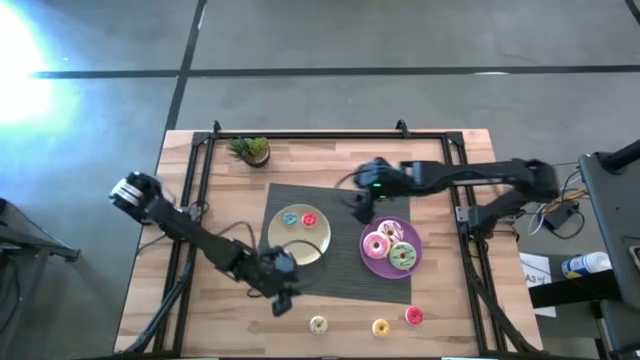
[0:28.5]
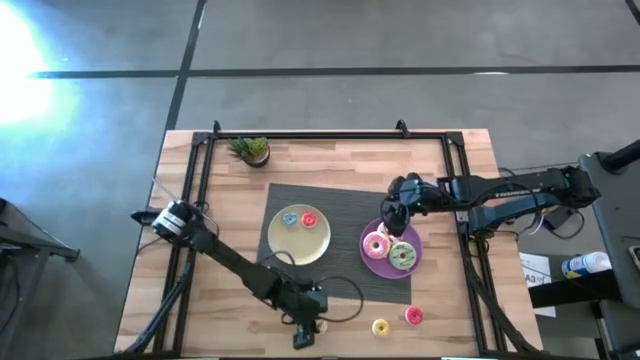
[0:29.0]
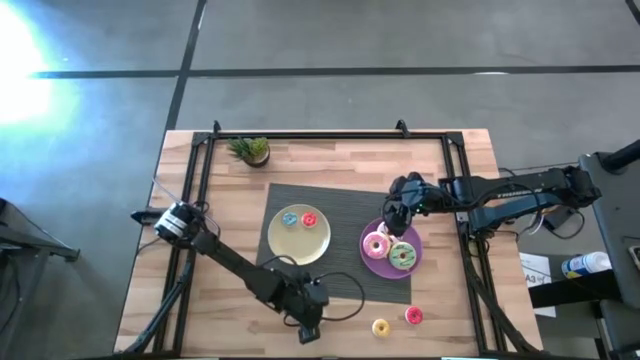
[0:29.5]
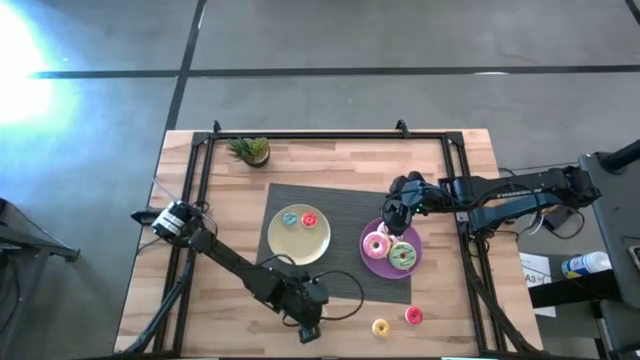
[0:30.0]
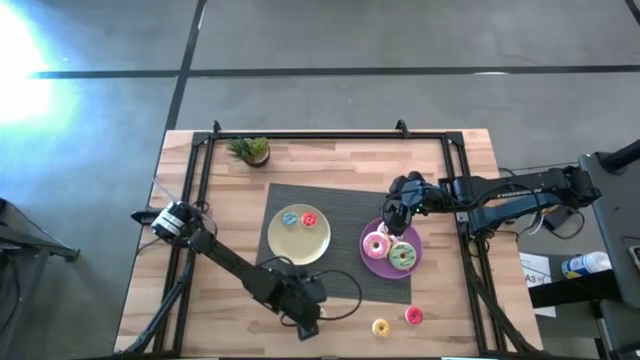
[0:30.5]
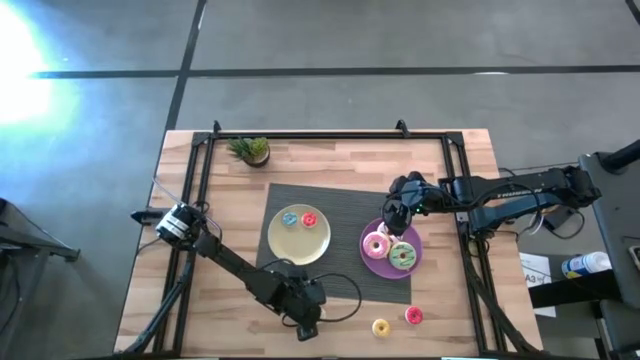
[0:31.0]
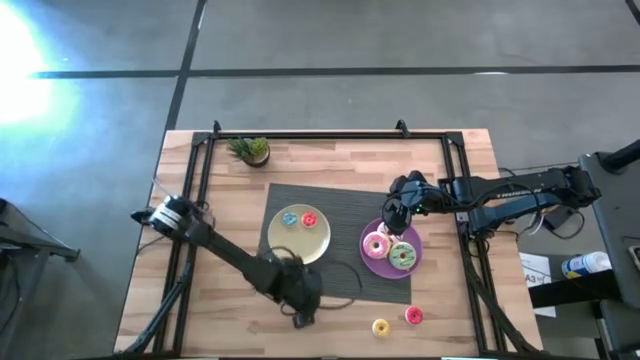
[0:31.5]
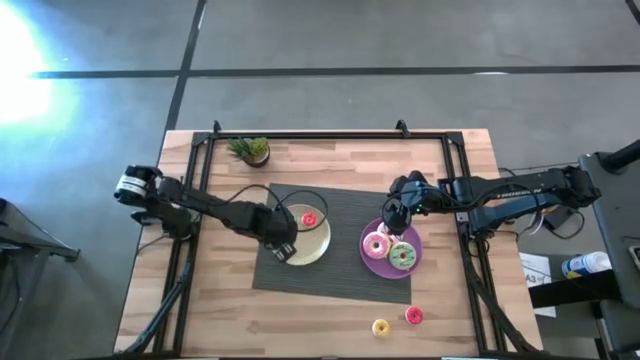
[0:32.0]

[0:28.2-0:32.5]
Task: Pick & Place donuts
Put the small white donut on the beige plate

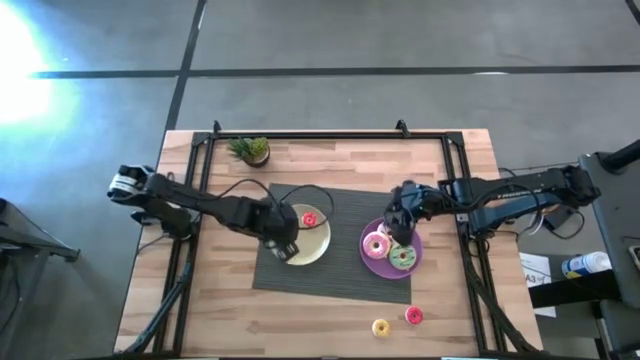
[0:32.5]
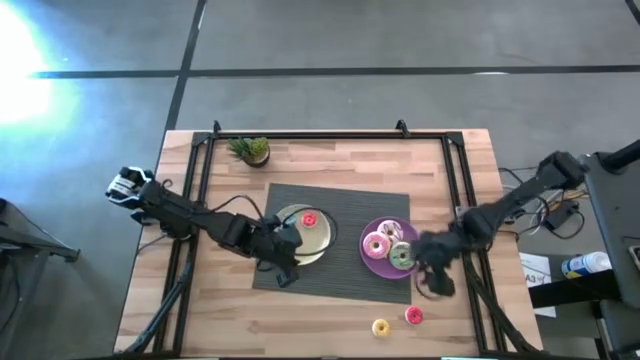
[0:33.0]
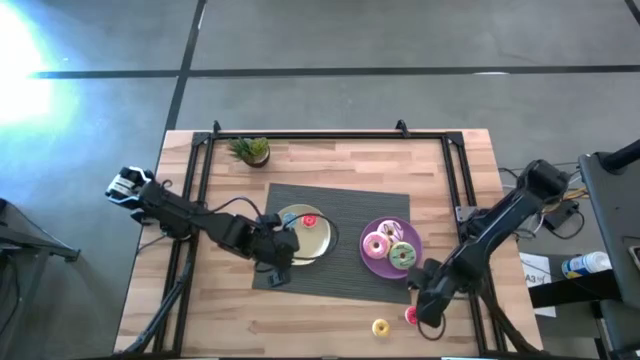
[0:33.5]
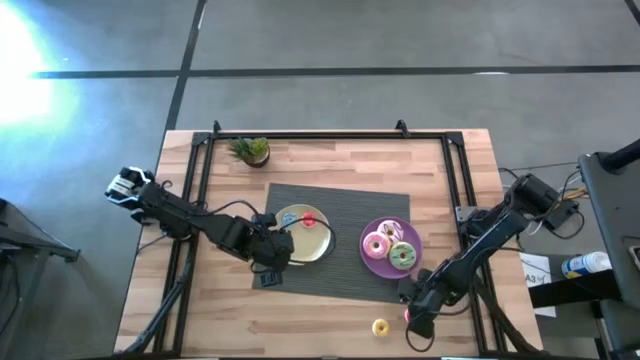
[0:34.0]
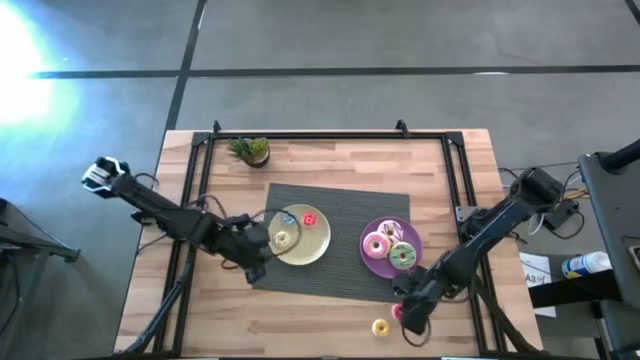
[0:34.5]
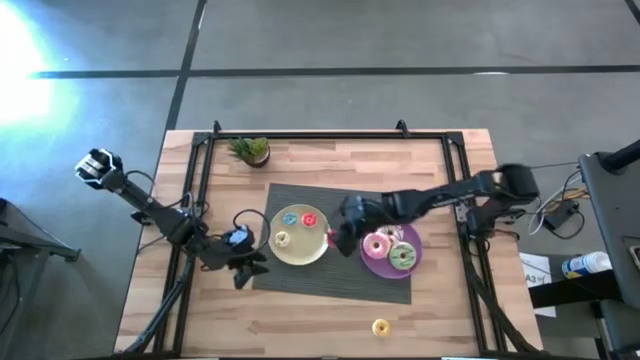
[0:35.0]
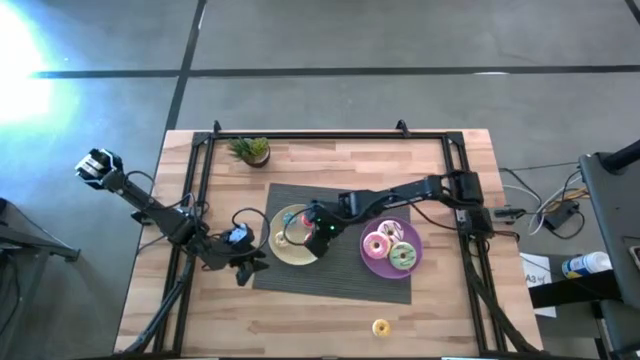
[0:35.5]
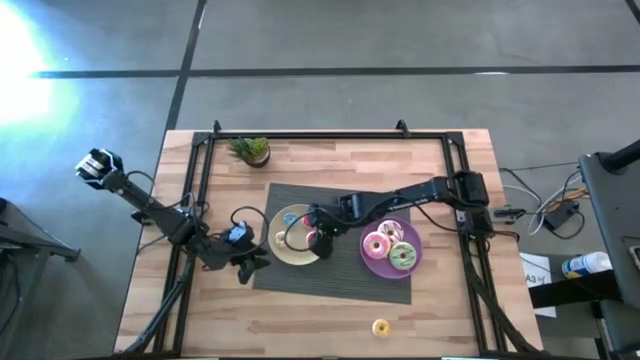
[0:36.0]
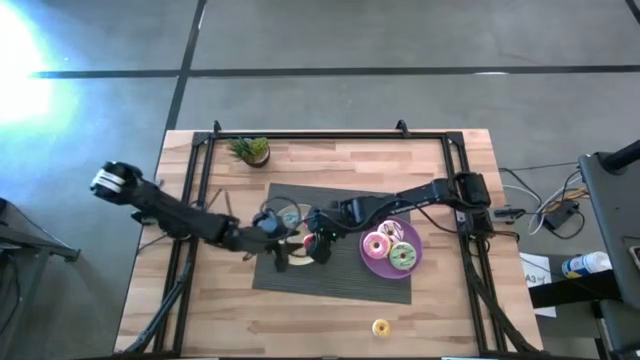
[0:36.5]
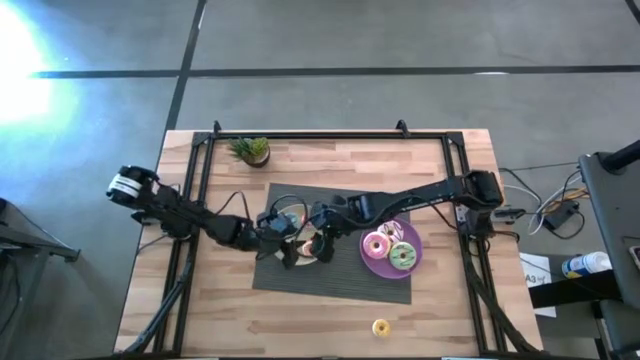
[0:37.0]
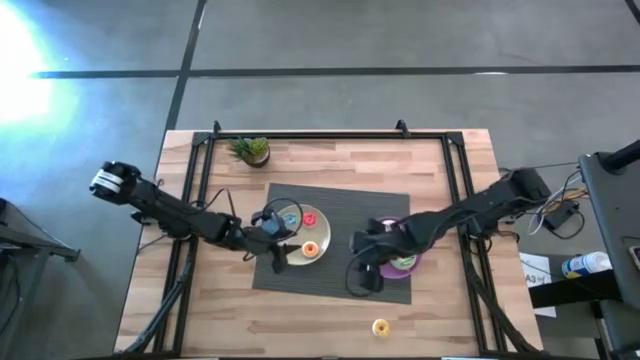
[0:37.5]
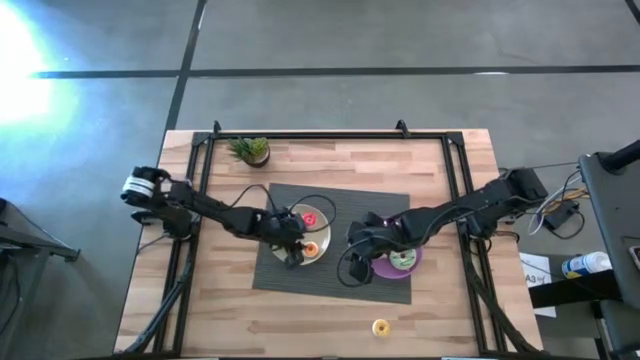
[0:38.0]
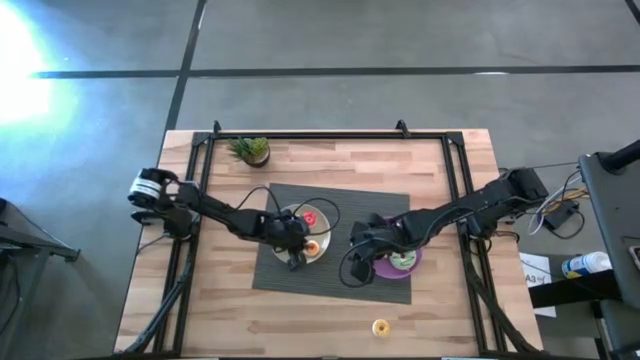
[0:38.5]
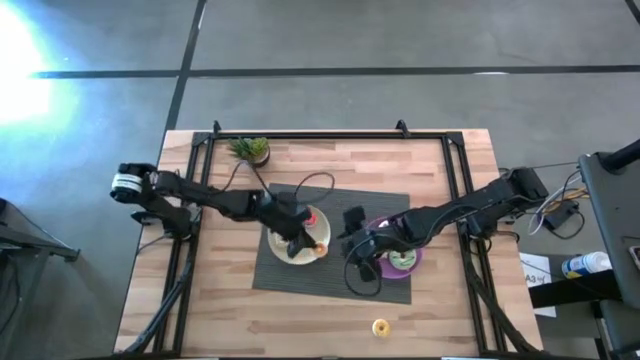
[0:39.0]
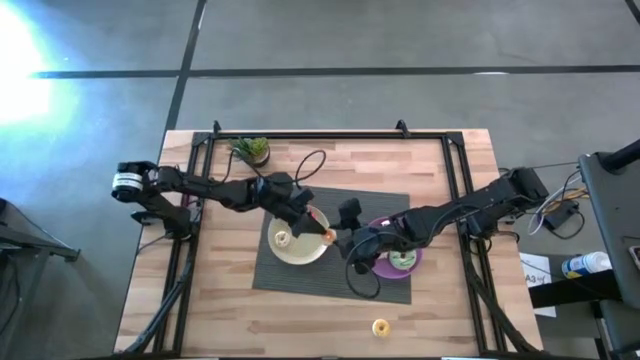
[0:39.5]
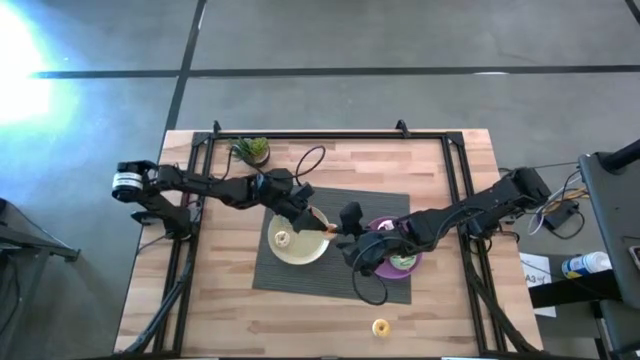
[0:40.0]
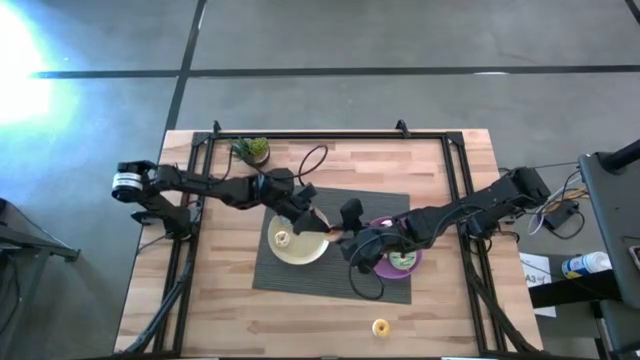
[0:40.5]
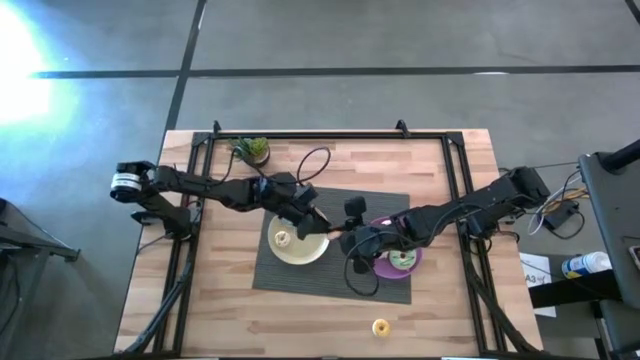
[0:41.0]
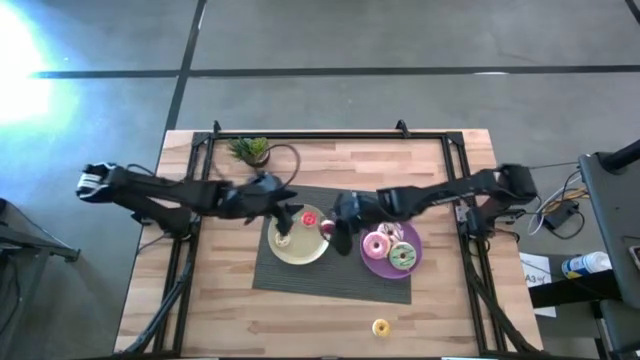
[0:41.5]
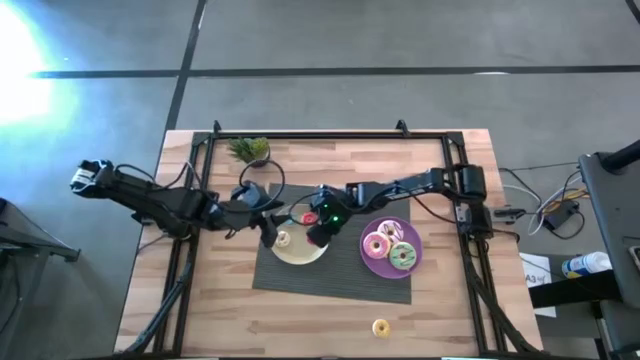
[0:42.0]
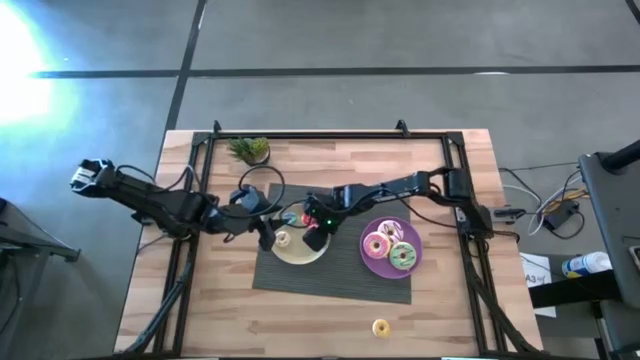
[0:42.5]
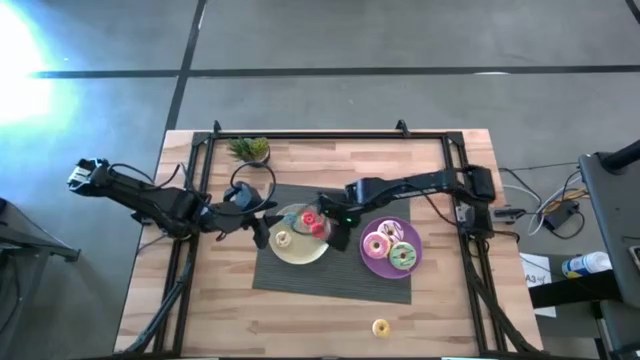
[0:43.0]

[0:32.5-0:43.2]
Put the small red donut on the beige plate

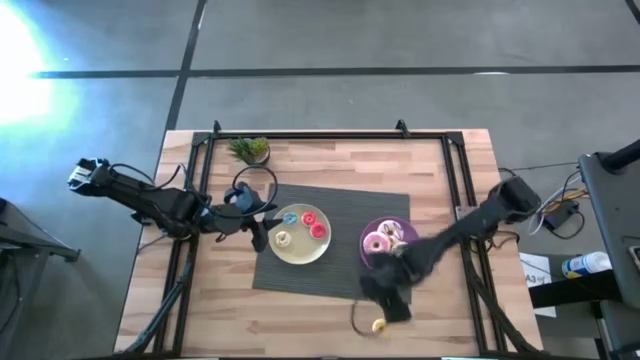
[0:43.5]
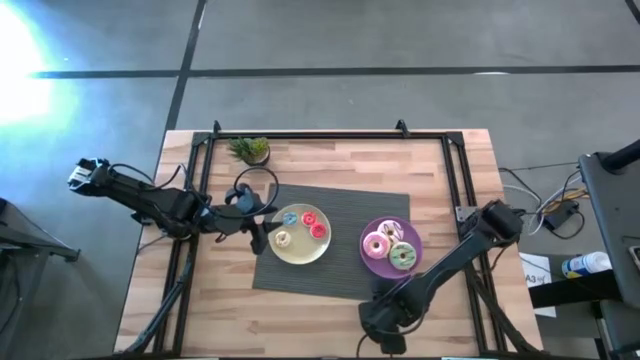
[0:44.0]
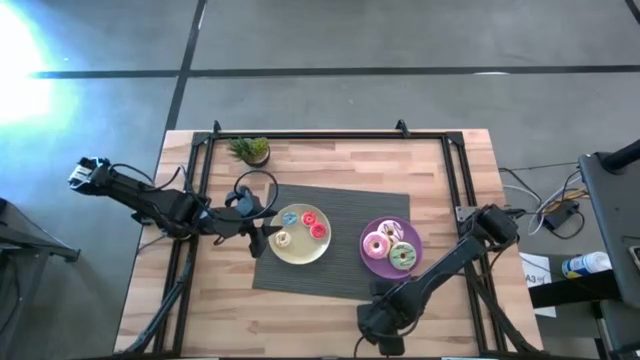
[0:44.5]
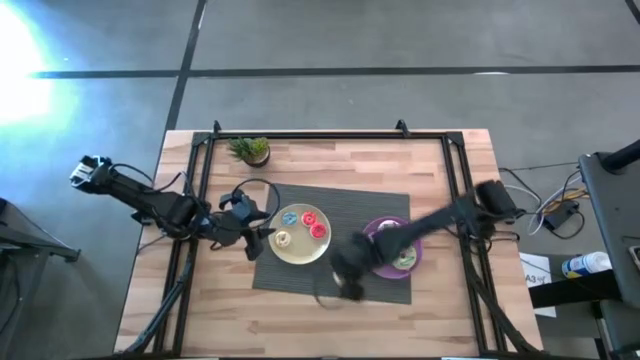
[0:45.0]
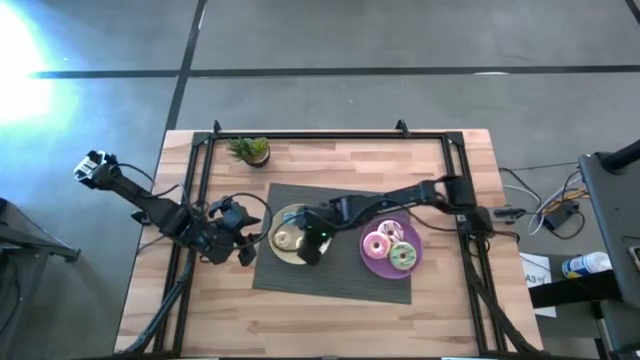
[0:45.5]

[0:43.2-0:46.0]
Put the small yellow donut on the beige plate

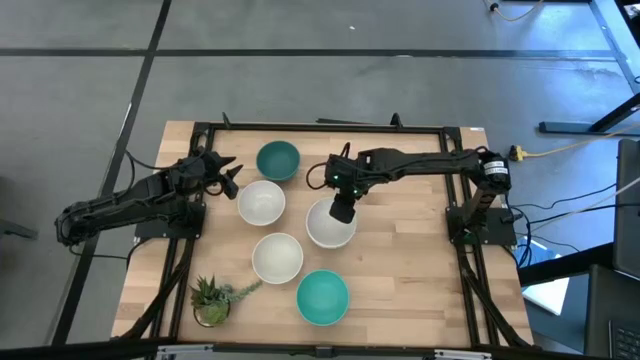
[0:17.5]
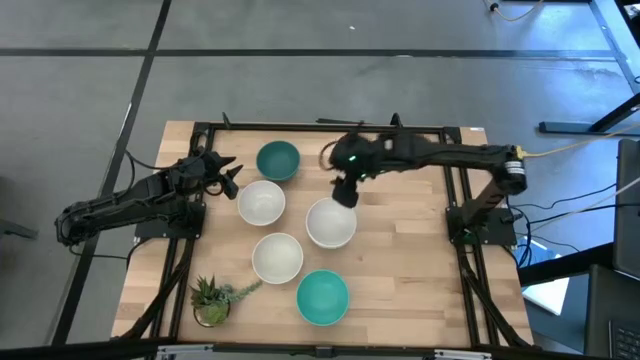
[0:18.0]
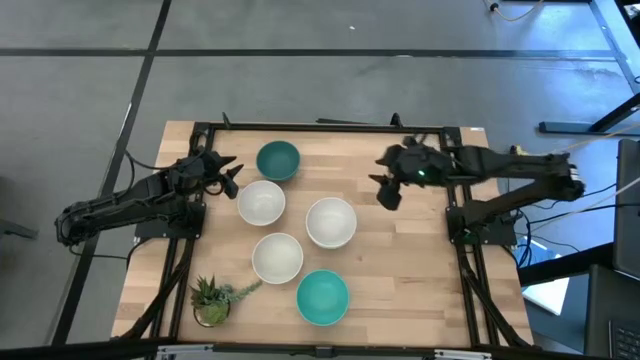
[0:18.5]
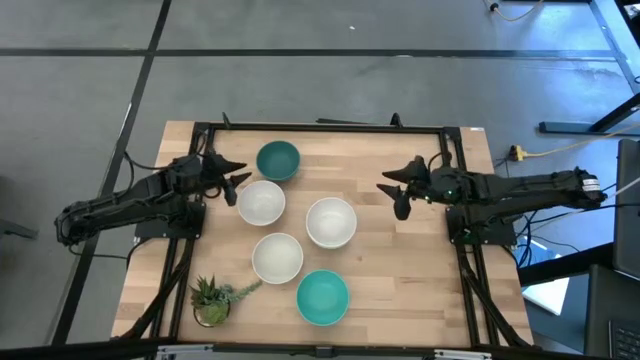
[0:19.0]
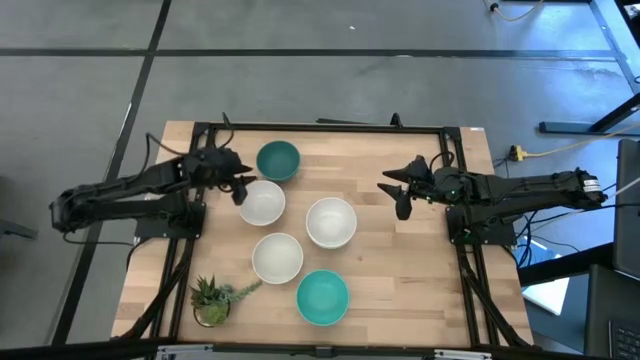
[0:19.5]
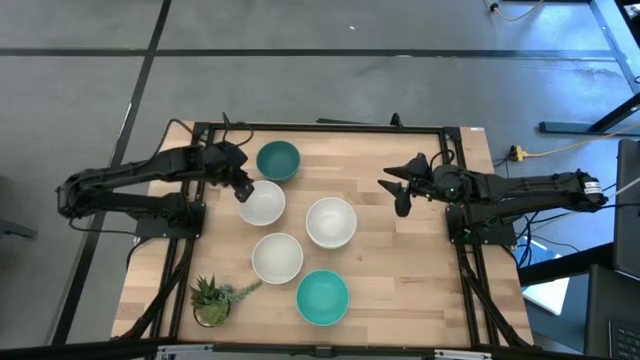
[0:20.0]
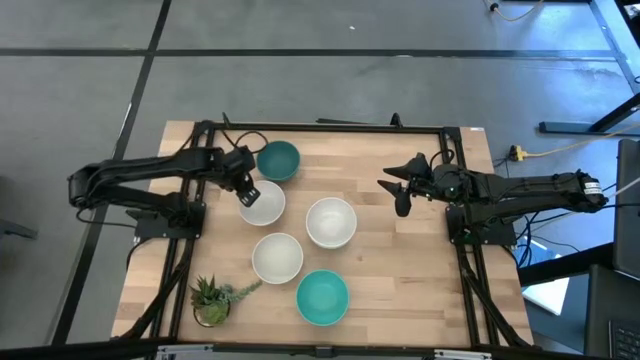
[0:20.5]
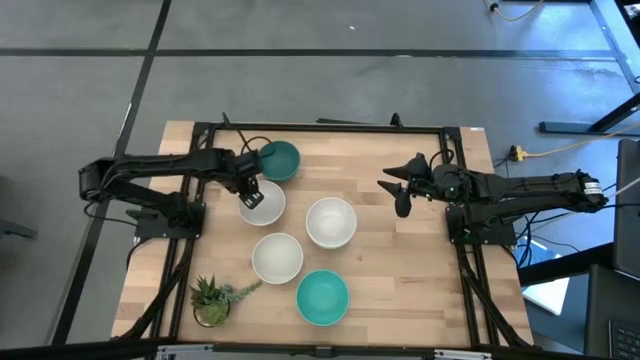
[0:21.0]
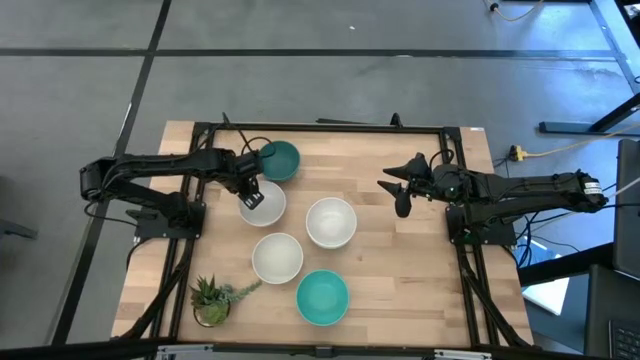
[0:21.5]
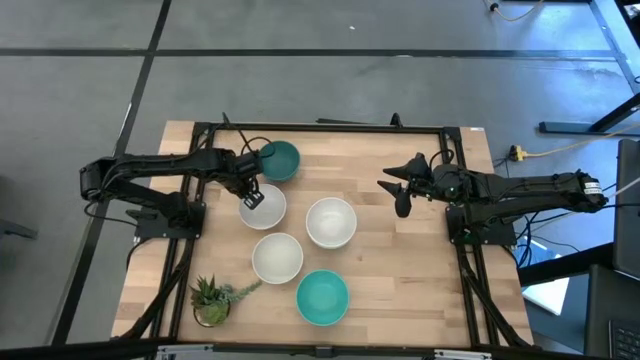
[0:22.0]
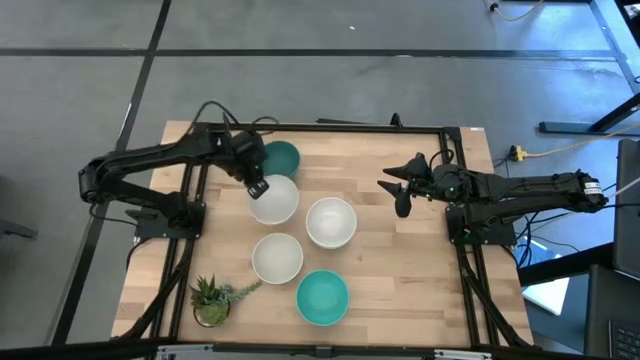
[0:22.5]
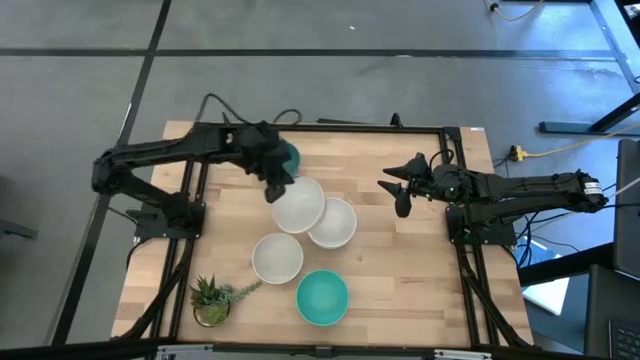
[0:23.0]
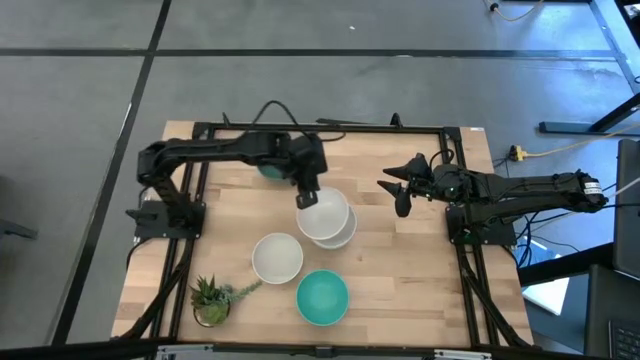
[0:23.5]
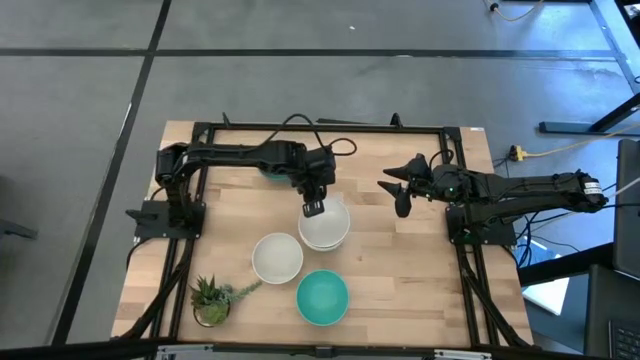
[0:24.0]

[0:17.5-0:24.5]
Task: Nest bowls inside each other
Stack the white bowl on the white bowl
